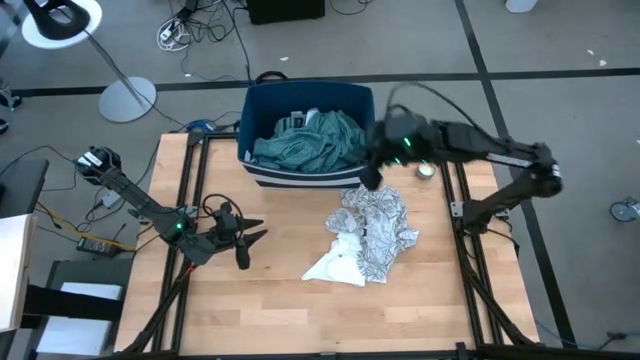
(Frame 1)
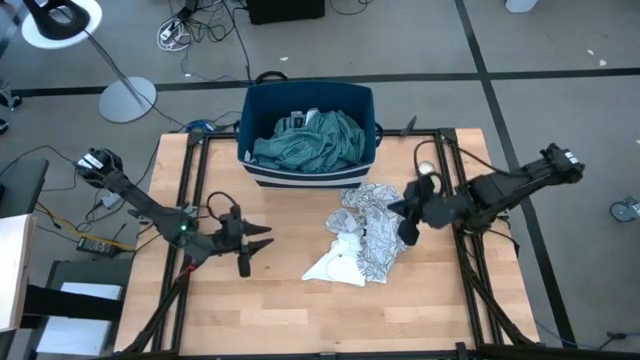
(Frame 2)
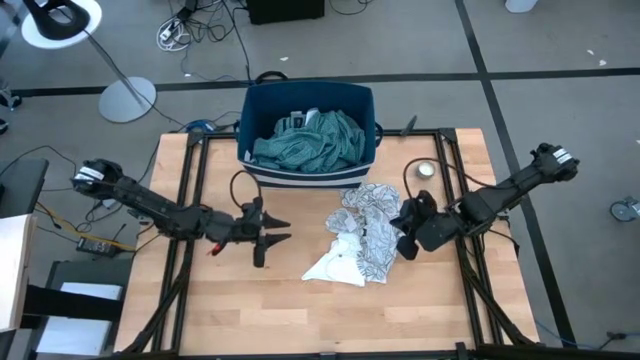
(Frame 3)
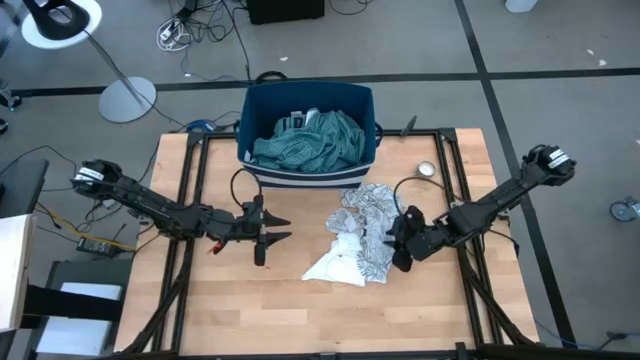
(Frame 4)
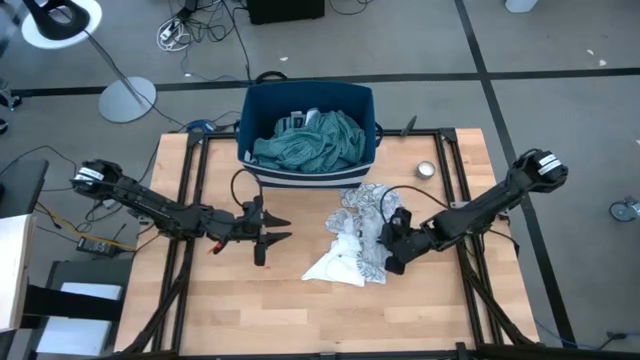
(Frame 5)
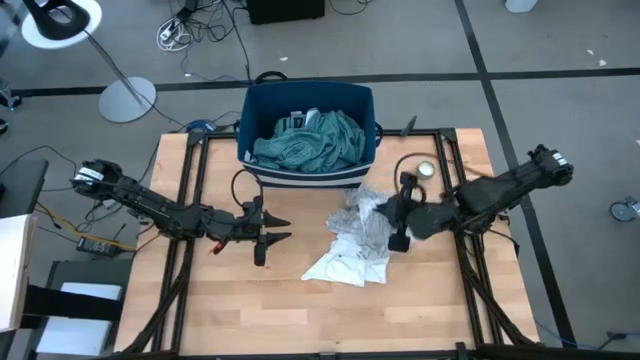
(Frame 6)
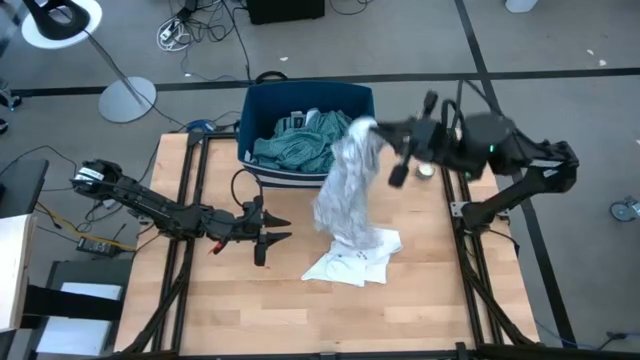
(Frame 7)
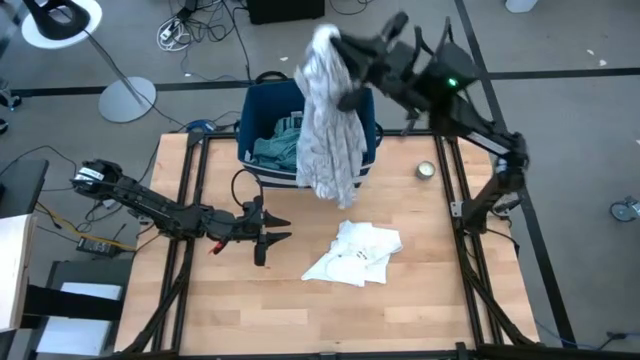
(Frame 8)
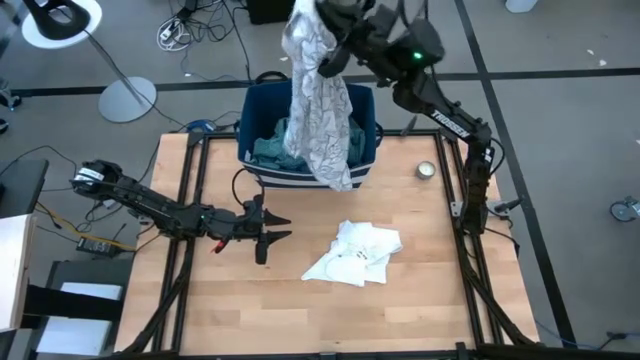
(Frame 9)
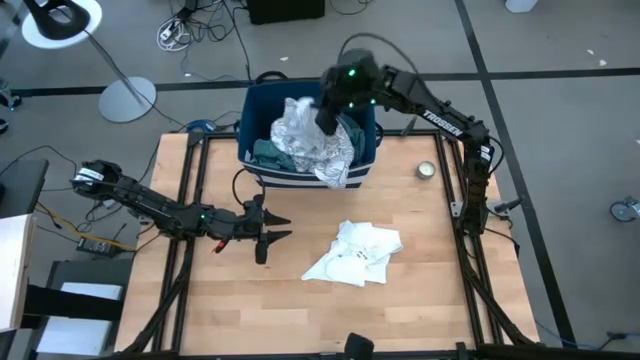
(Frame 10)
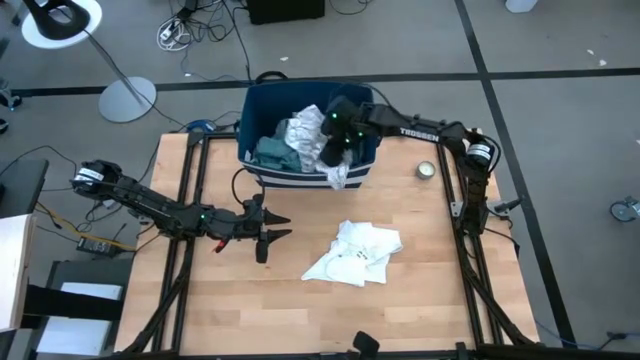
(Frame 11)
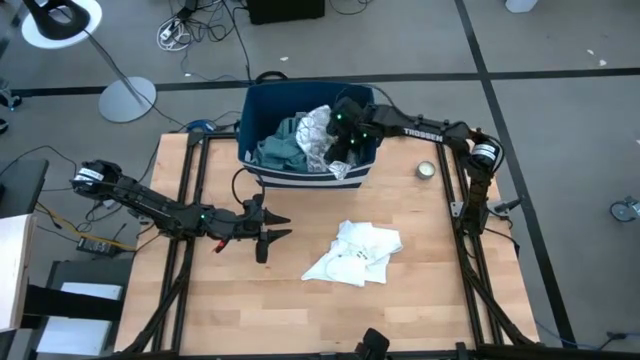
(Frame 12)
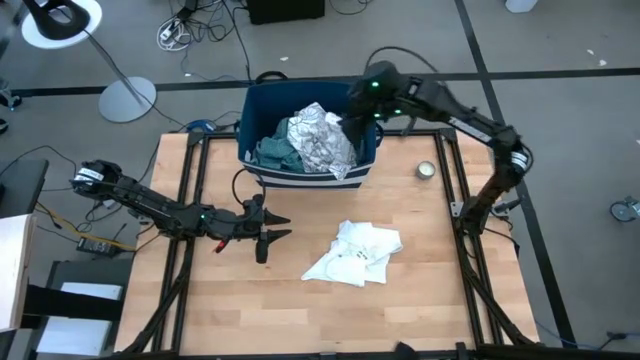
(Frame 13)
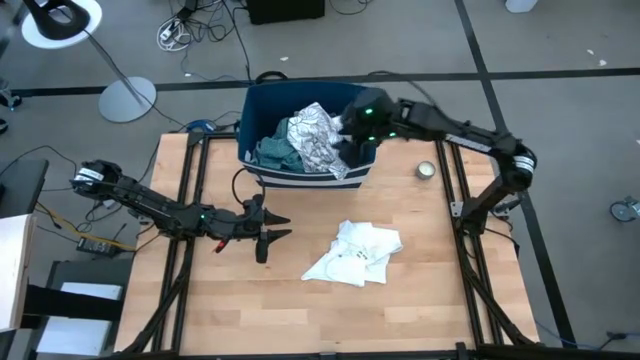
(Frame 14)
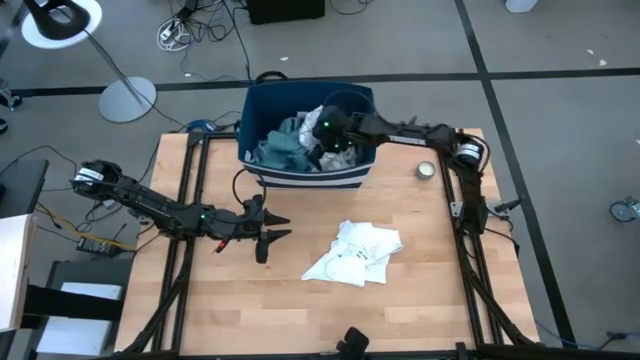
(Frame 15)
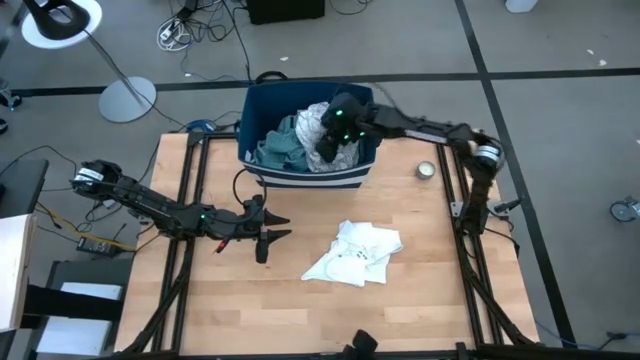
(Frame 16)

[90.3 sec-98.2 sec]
Task: Sort clothes
Put the white shirt into the blue laundry organizer

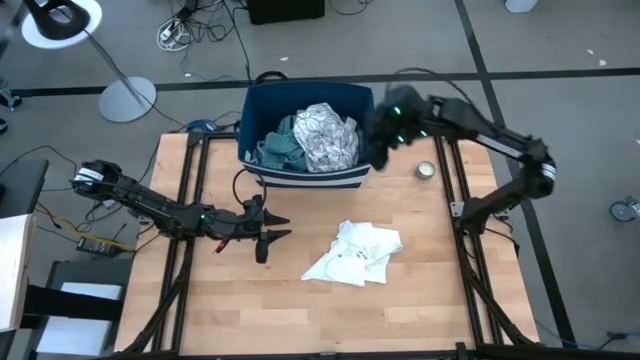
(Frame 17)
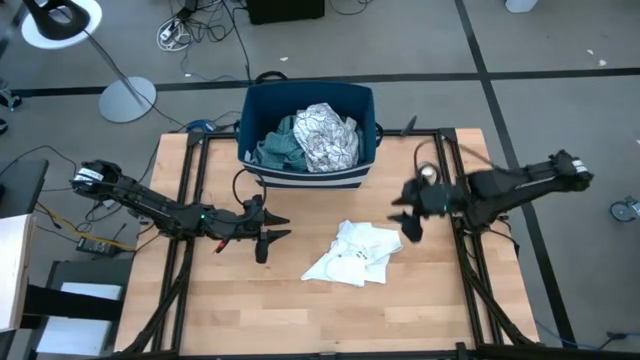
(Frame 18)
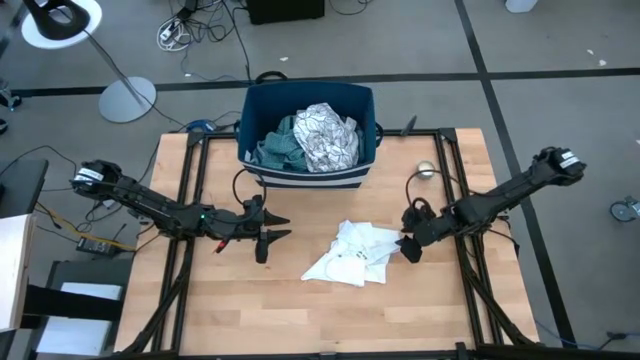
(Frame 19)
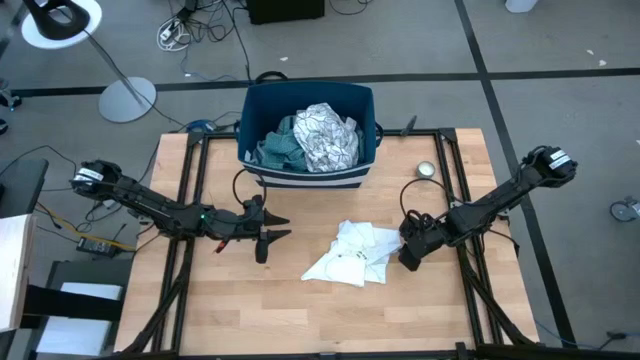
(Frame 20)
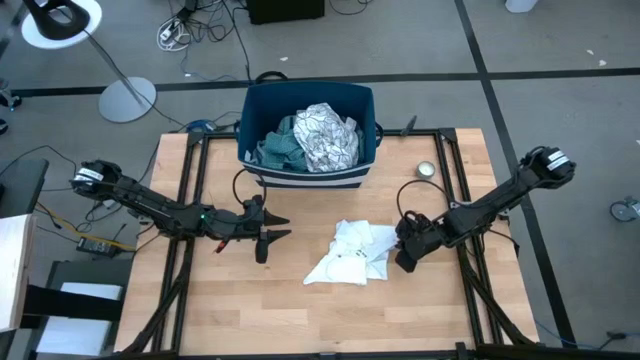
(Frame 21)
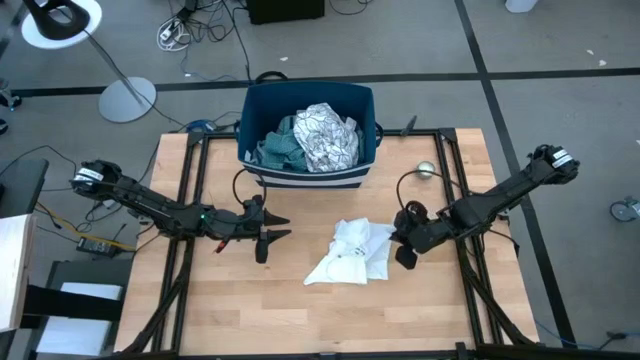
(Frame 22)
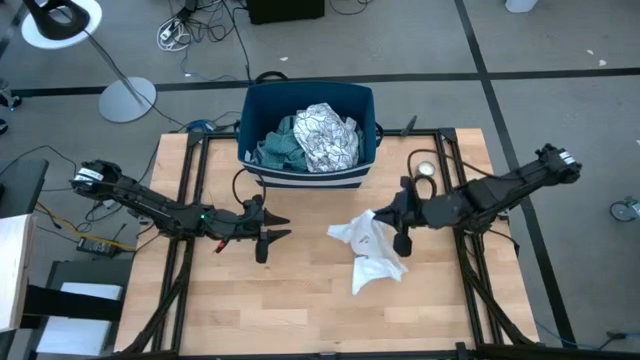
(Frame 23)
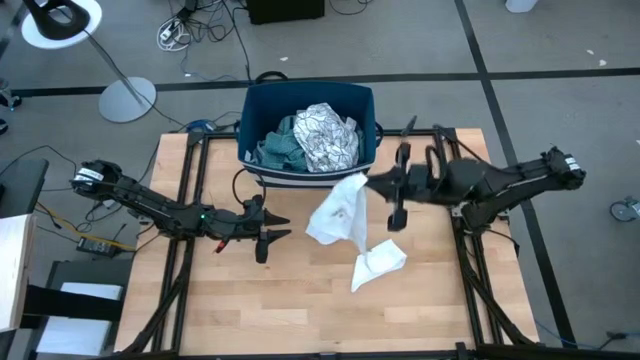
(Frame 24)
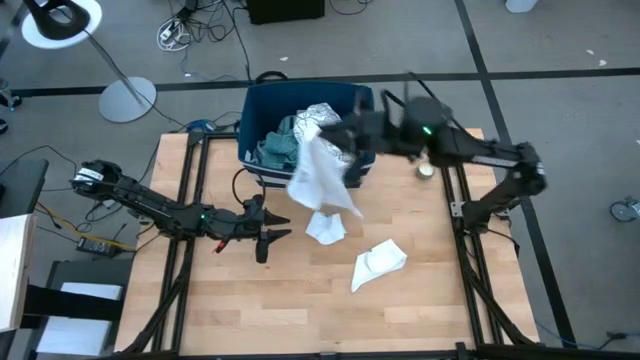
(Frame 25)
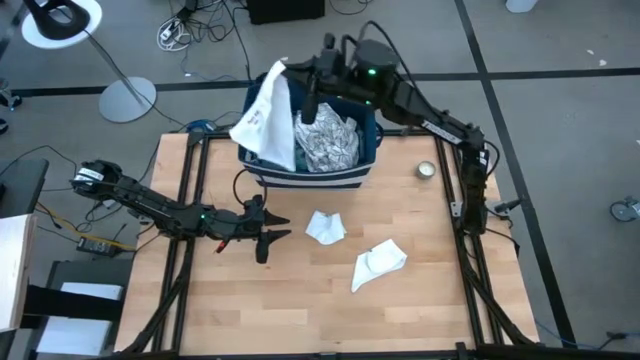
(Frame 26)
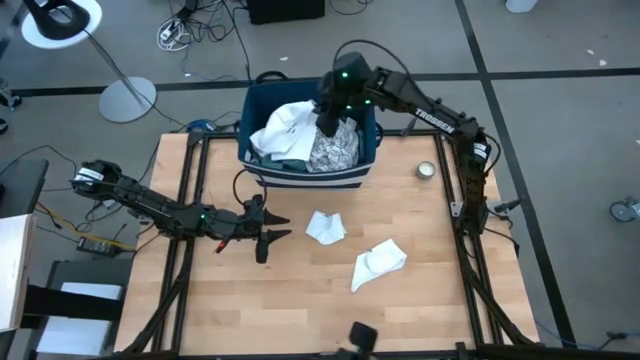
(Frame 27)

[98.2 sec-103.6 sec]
Put the white towel into the blue laundry organizer

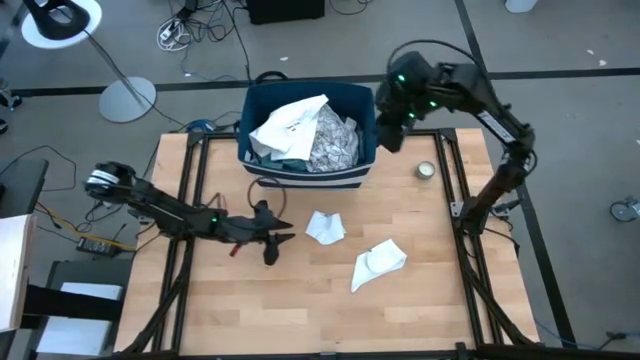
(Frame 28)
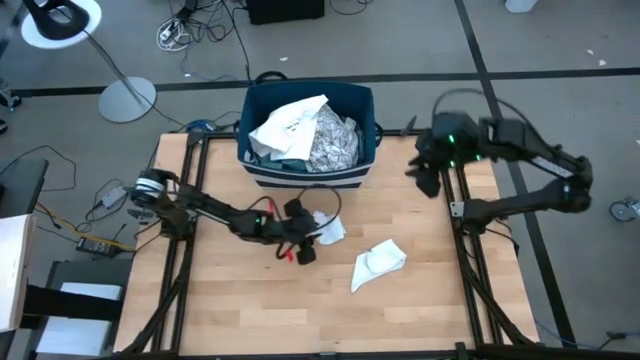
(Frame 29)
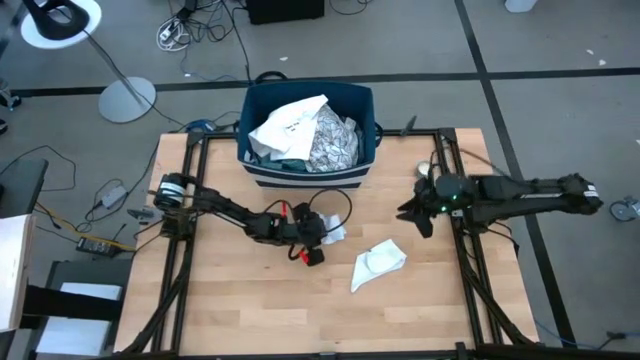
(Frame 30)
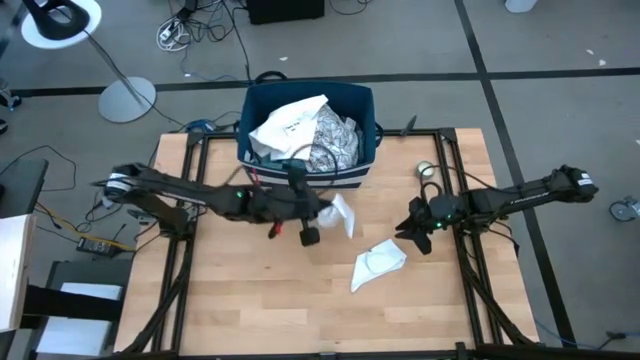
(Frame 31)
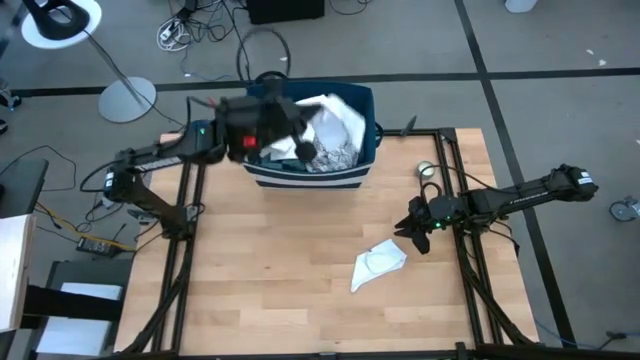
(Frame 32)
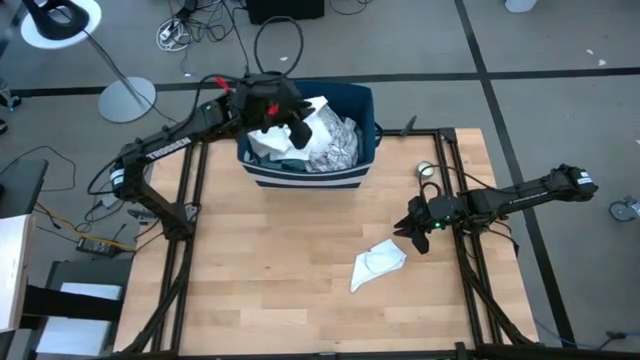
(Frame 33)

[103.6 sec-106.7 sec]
Put the white sock into the blue laundry organizer

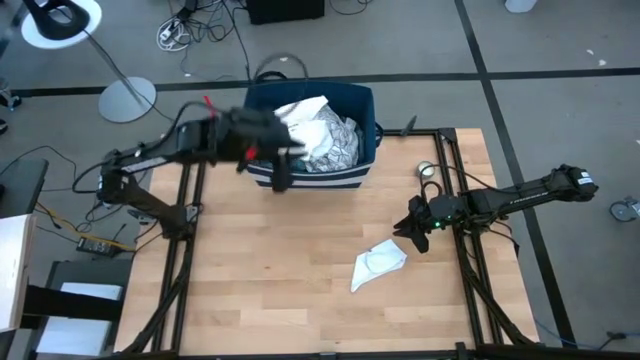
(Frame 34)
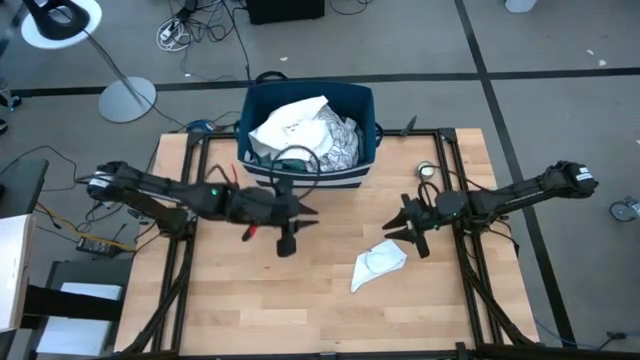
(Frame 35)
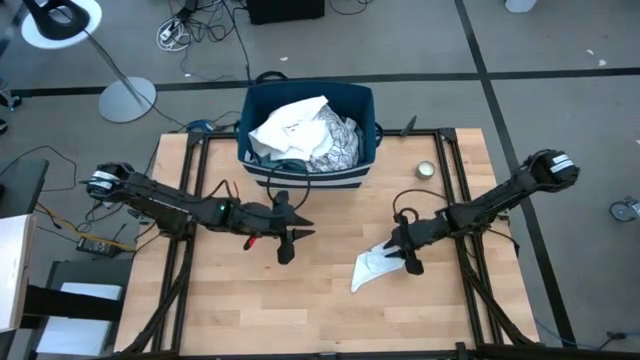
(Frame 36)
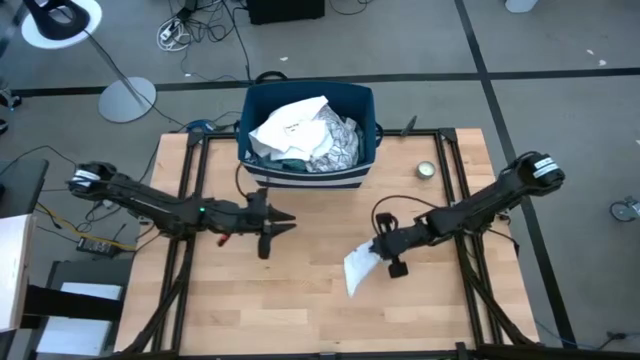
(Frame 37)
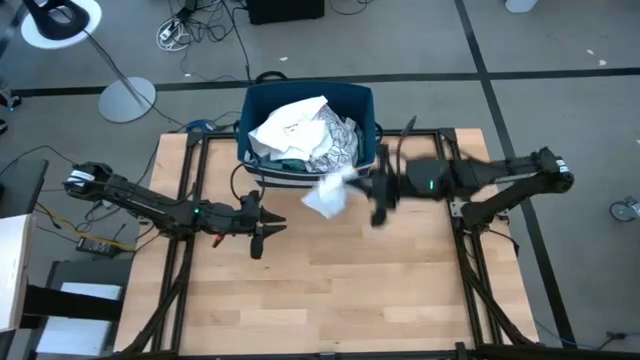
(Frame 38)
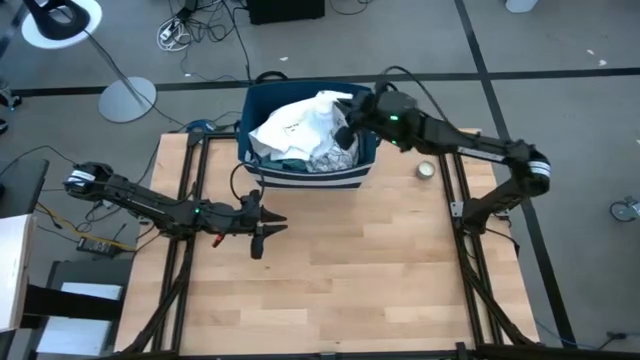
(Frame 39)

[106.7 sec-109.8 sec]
Put the white sock into the blue laundry organizer
